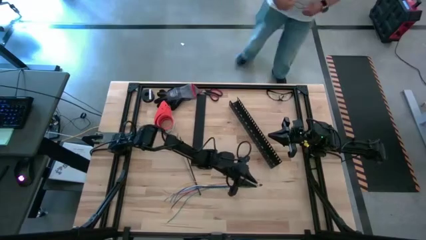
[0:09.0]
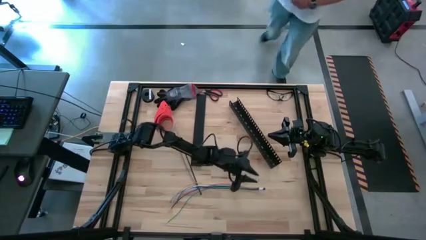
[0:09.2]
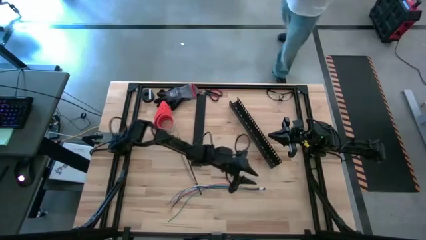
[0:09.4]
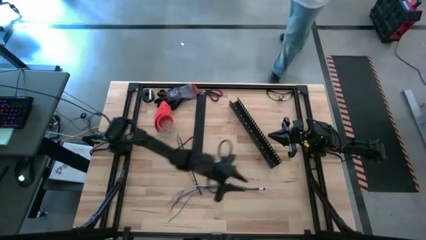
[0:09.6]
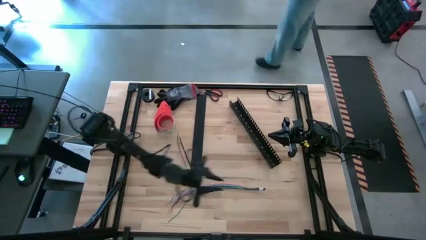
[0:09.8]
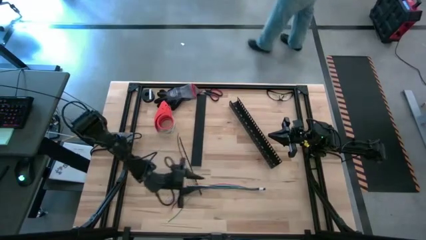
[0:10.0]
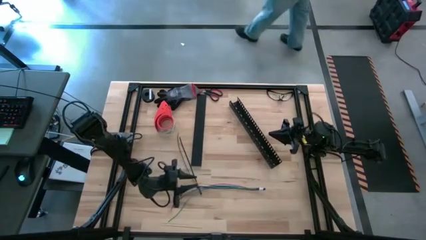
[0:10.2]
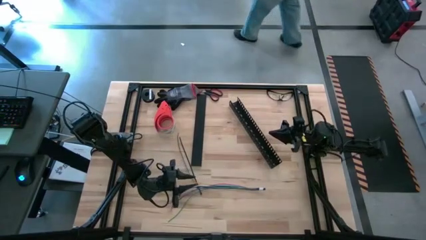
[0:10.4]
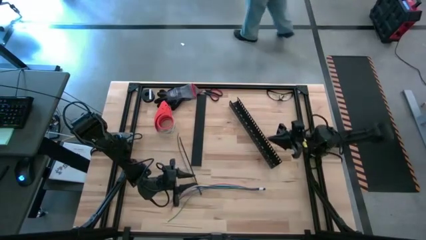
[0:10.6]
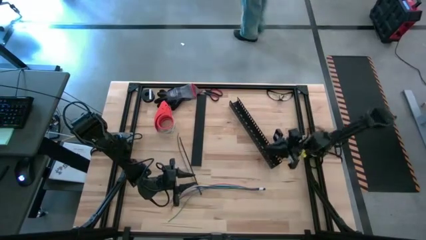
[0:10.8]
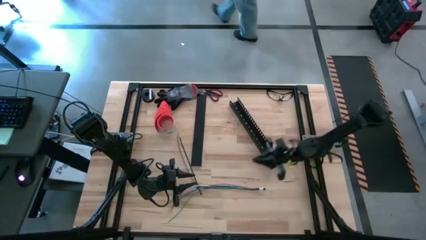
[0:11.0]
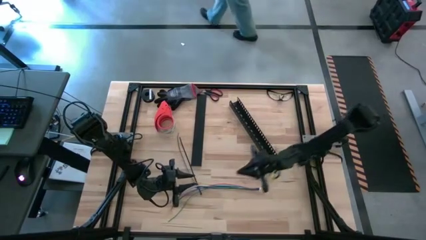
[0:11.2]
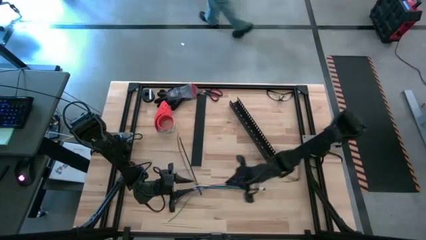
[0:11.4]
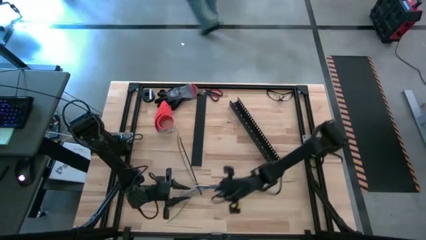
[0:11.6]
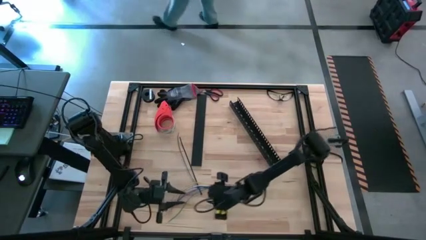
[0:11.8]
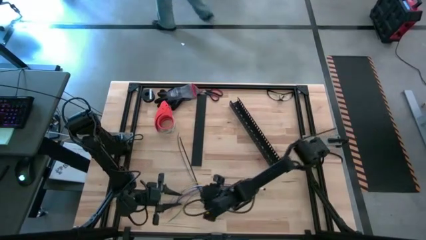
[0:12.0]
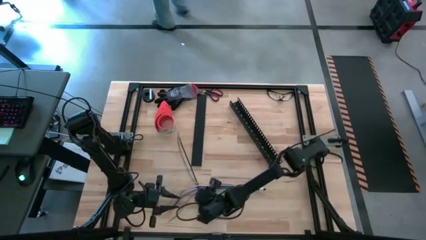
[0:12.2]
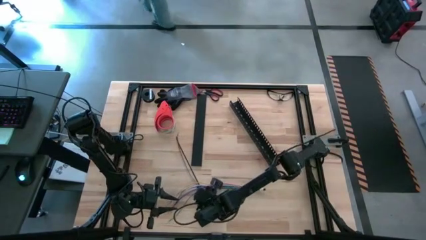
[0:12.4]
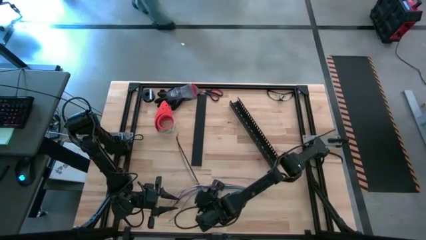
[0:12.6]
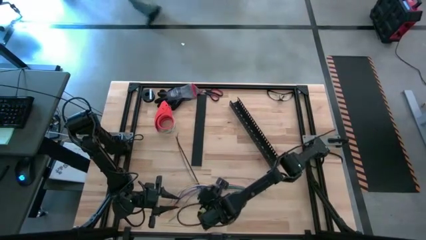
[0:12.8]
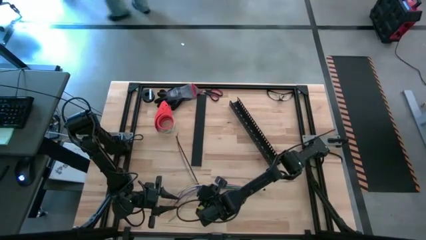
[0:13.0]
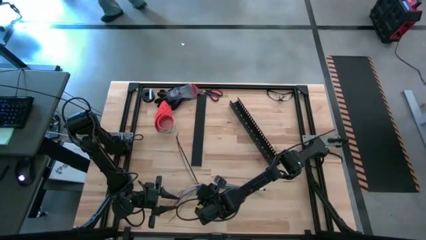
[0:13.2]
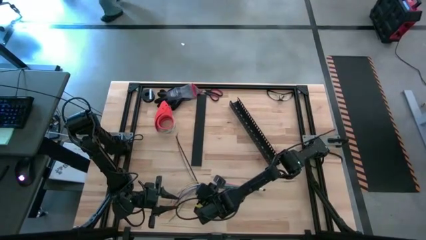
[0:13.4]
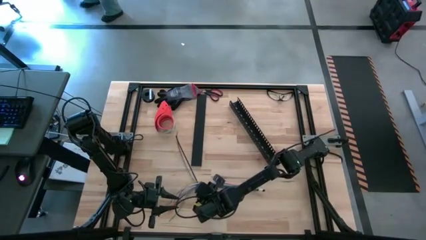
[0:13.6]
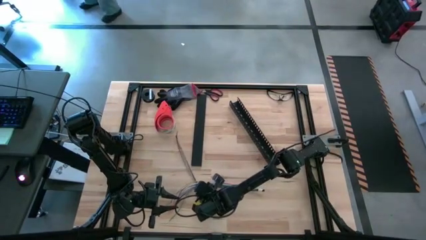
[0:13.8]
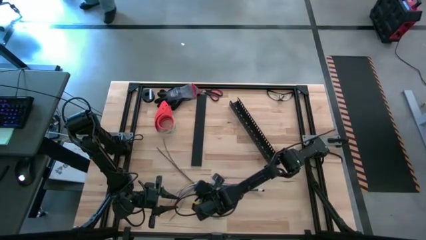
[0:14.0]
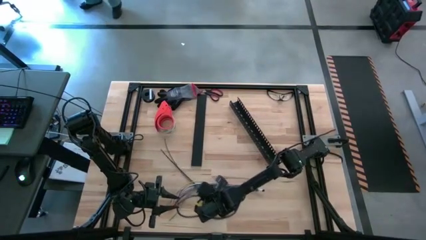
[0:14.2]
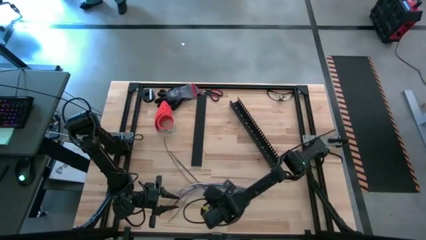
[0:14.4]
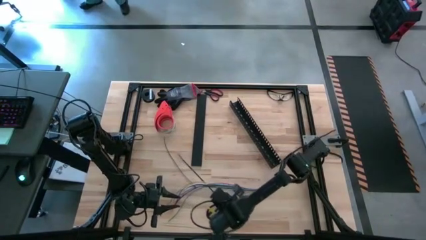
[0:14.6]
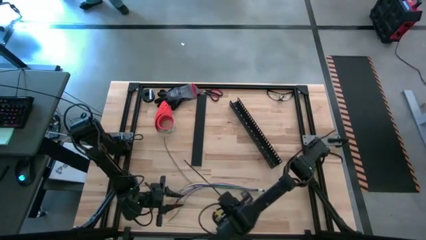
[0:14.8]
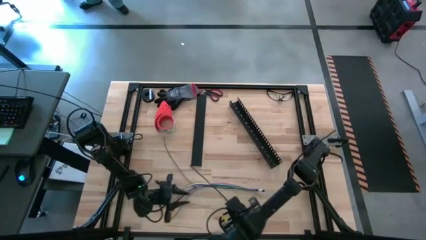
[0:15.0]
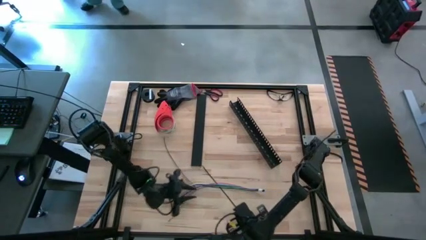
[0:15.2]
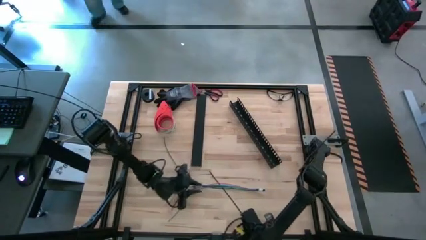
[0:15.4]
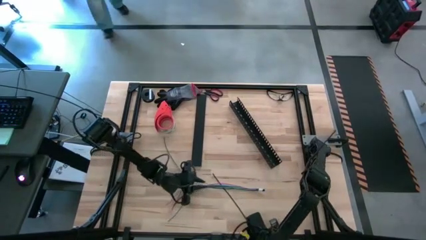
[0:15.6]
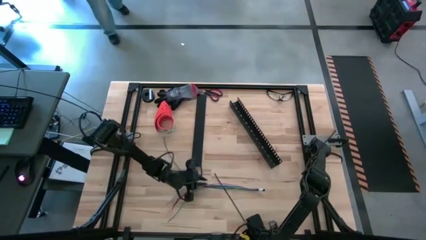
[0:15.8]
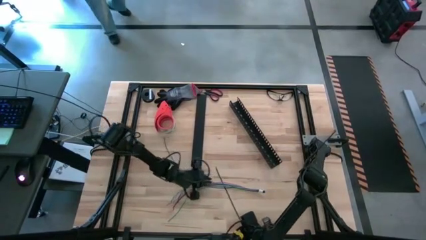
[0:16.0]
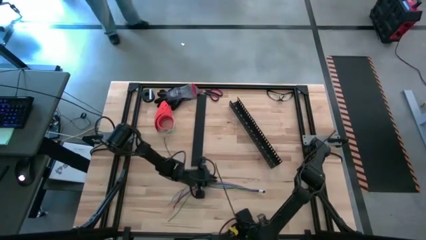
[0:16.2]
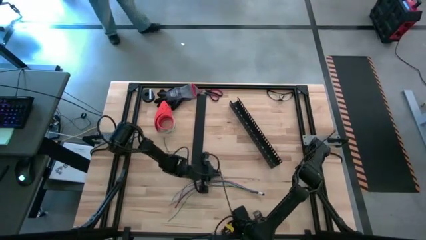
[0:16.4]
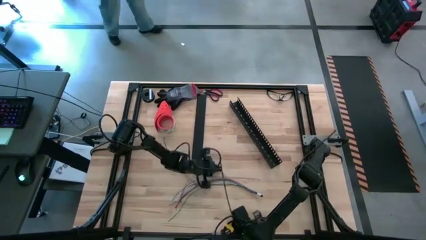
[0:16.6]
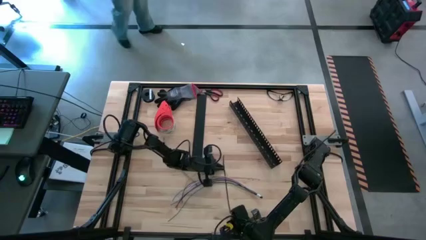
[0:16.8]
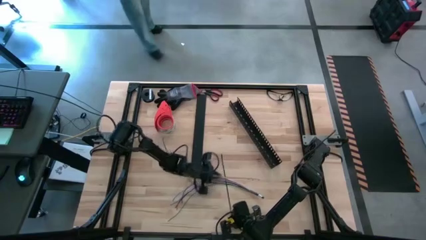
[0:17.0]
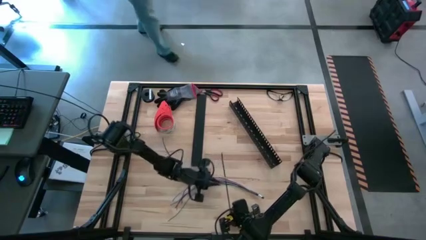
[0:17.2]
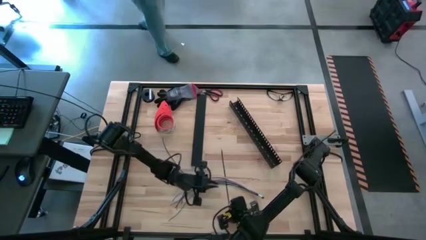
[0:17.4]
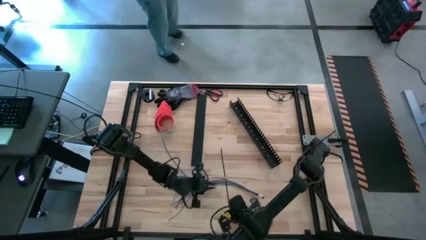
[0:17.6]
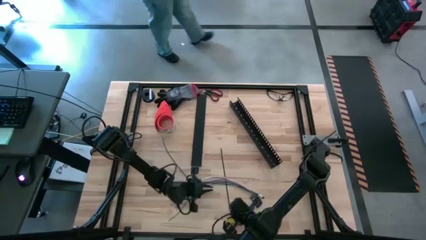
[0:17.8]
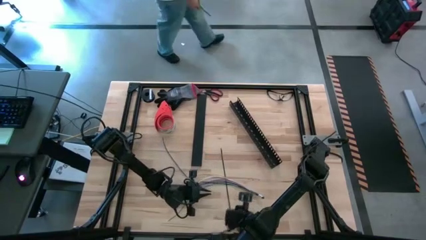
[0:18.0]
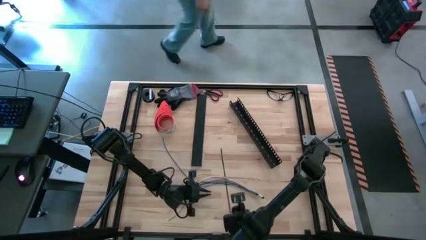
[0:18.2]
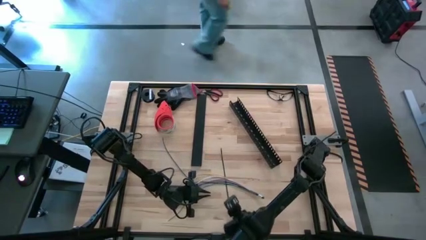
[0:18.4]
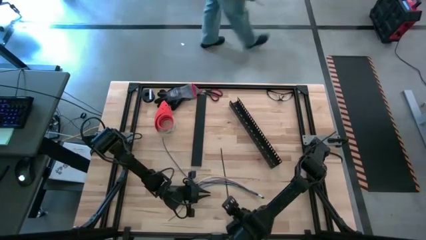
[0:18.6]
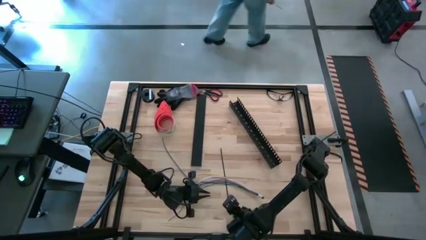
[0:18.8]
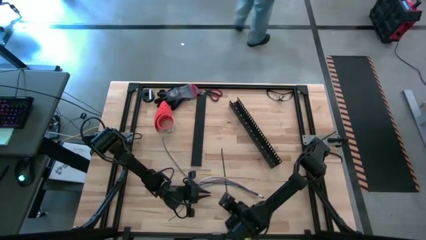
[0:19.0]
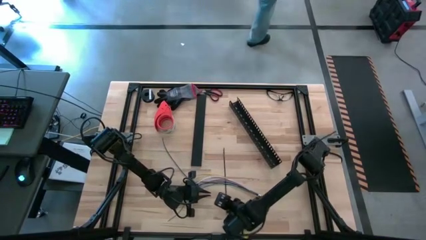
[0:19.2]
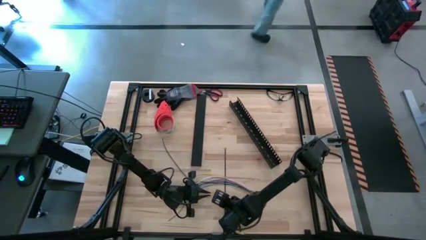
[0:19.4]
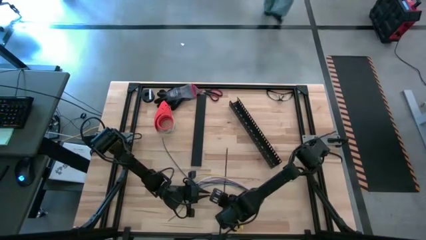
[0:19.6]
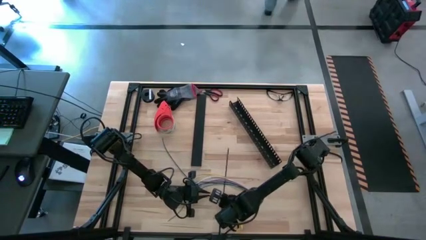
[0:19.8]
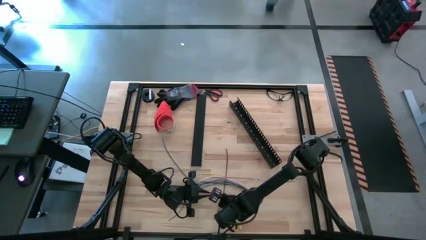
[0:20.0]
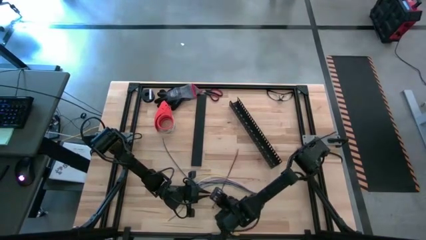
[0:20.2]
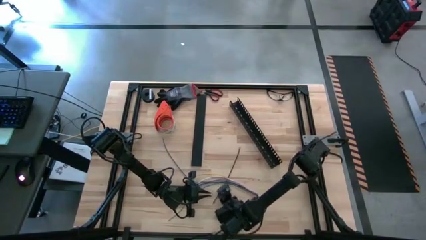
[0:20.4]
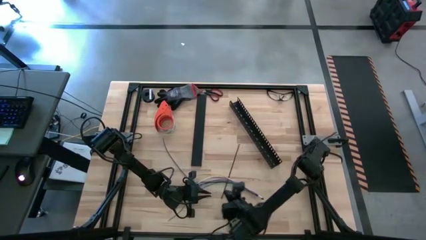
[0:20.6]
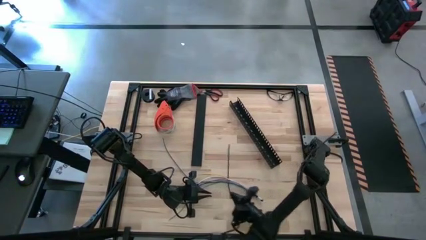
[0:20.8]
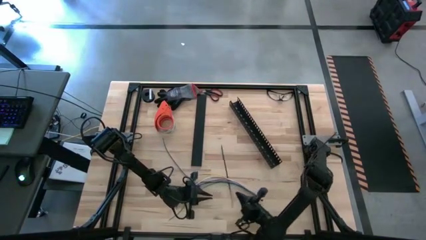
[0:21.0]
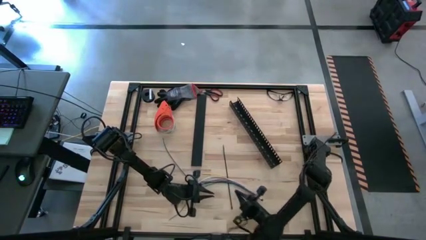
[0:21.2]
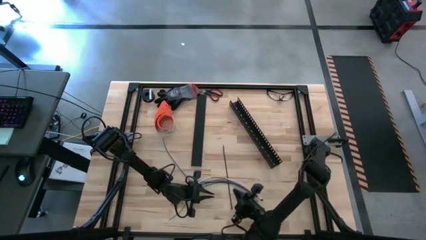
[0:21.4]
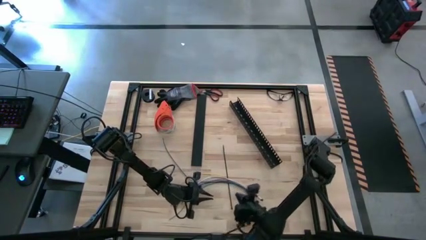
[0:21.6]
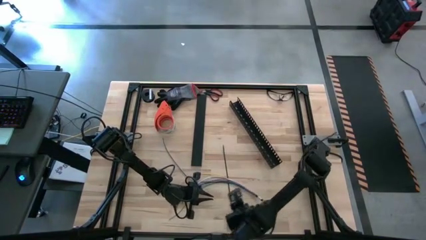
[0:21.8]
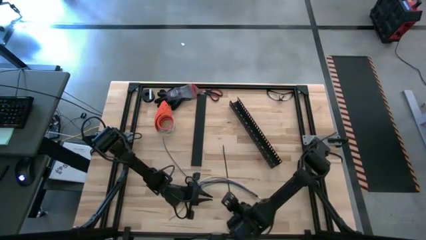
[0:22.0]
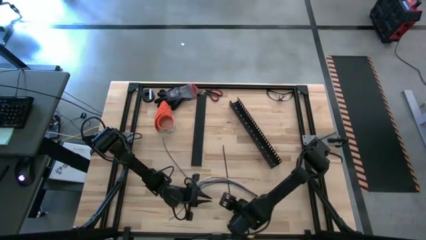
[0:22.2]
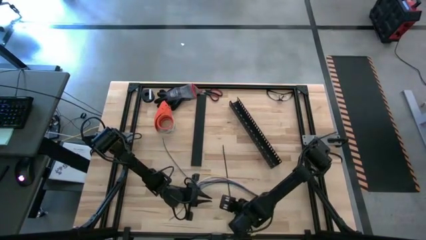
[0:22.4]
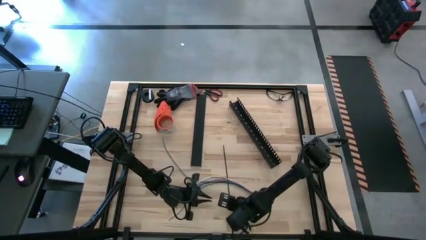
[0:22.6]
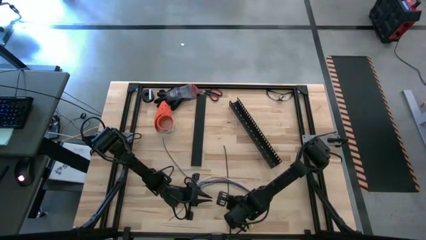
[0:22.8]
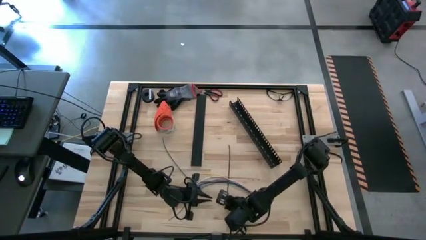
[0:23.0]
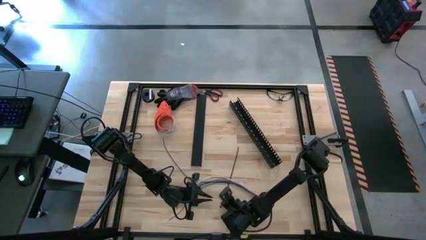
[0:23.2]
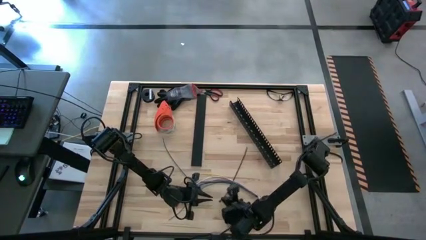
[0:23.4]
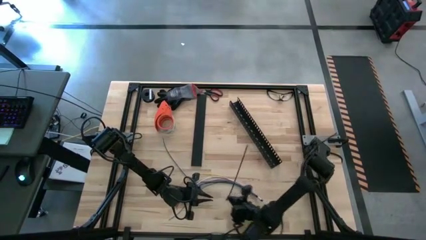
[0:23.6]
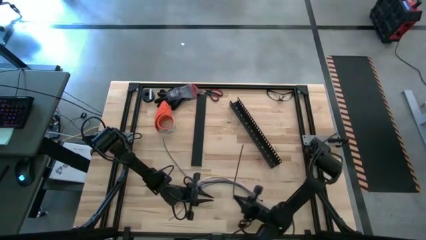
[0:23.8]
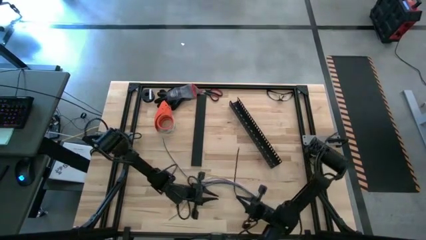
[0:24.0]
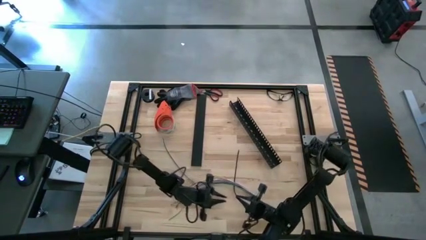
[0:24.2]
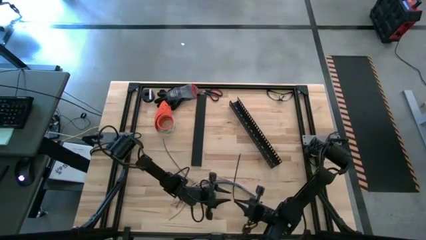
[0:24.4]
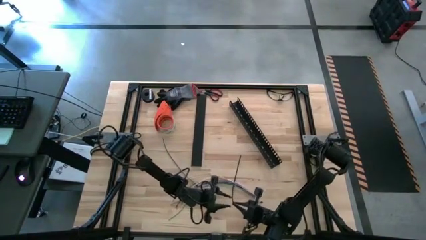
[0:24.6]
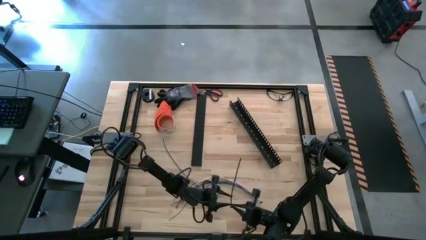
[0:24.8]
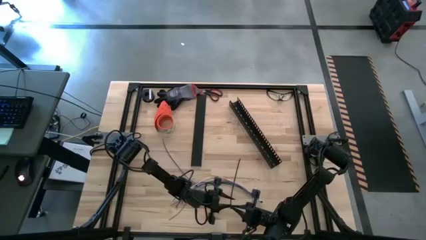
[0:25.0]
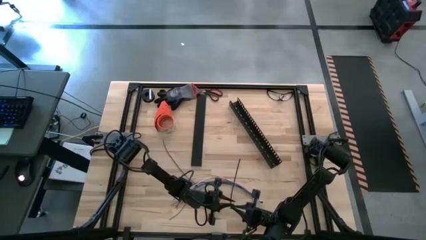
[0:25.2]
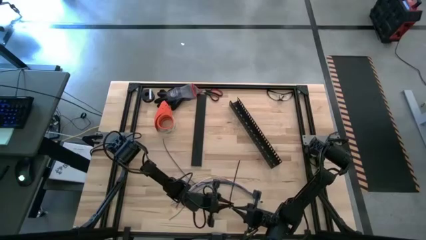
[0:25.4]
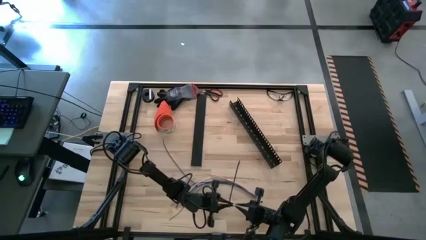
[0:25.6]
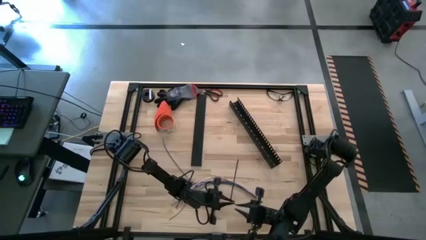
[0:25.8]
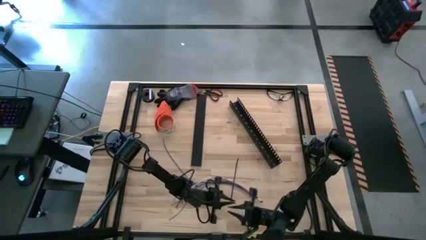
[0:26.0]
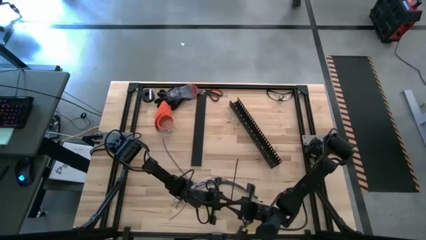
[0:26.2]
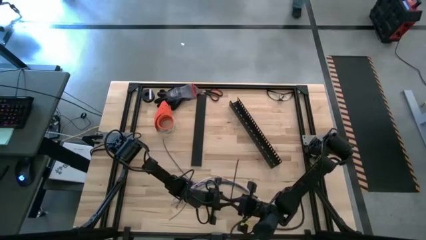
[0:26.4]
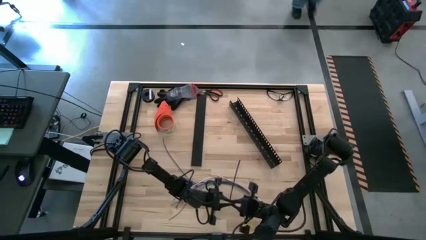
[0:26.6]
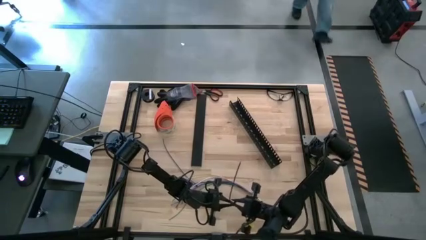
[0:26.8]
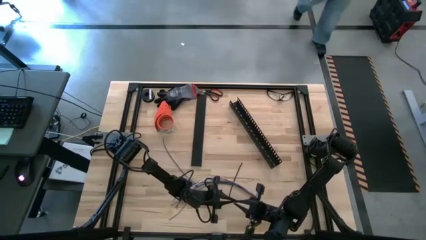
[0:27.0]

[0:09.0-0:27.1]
Task: Ziptie cables
Wrap the black zip tie on the cables
